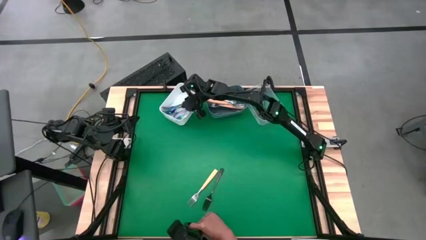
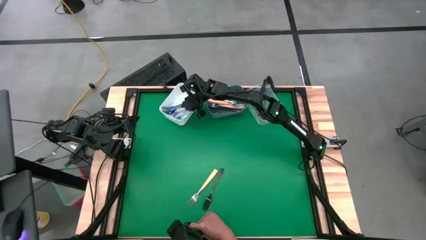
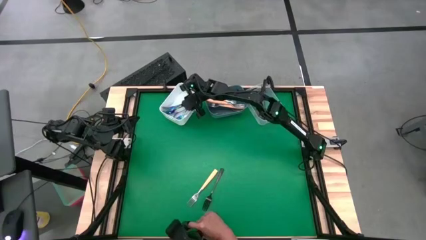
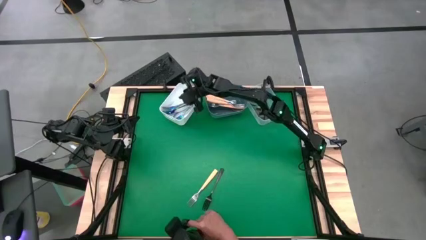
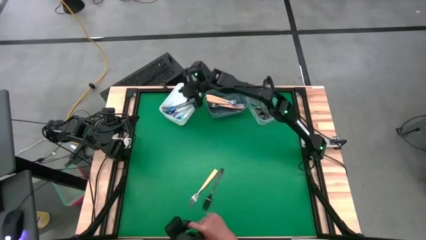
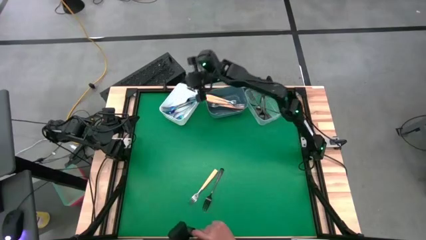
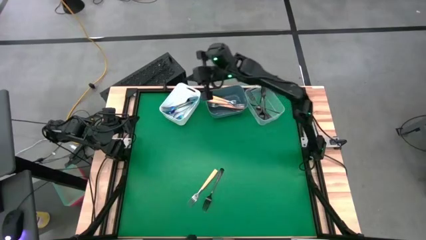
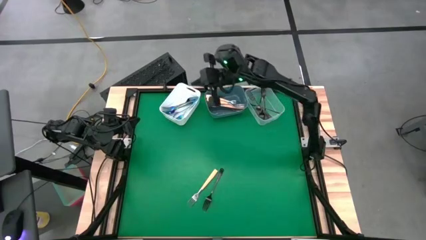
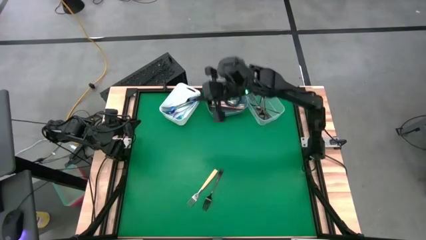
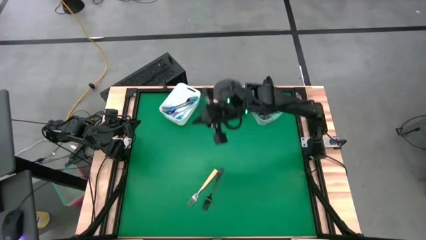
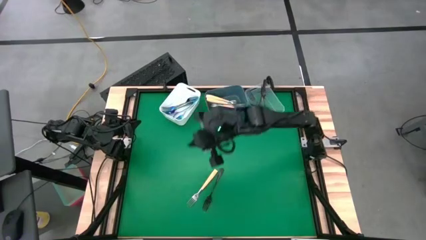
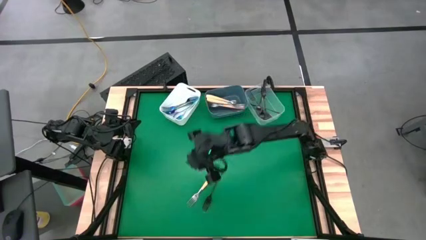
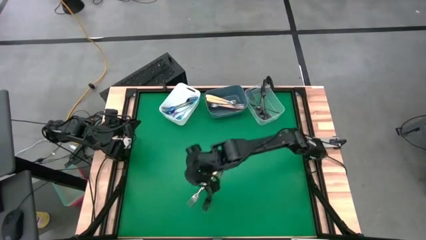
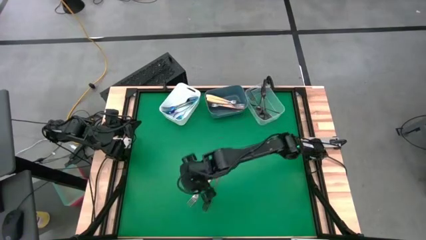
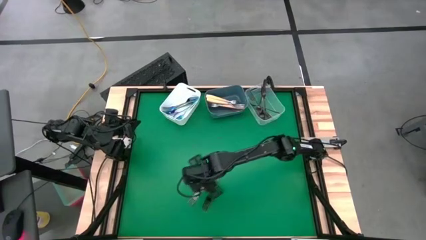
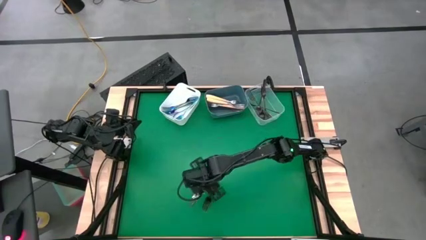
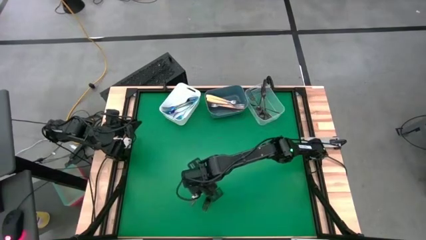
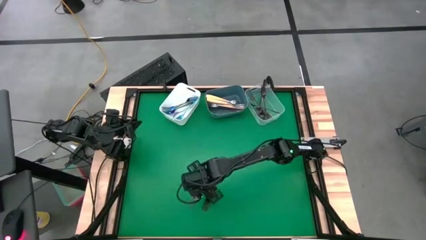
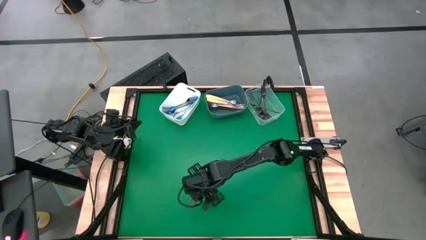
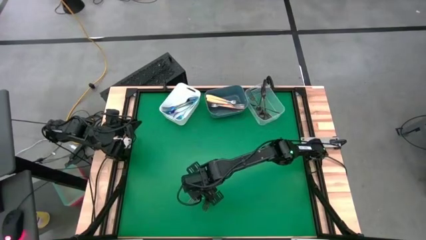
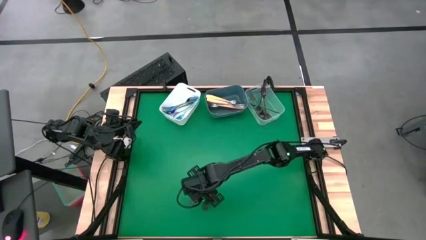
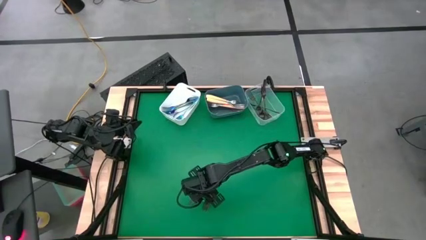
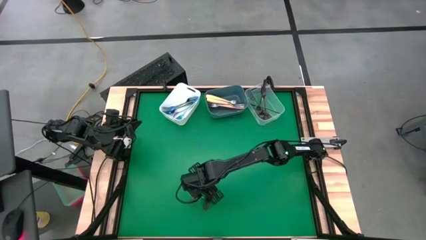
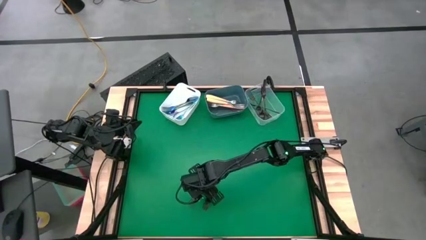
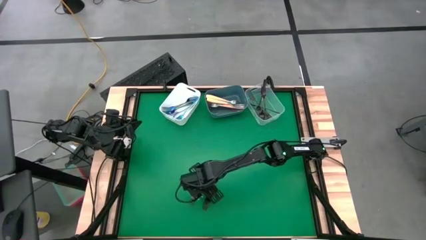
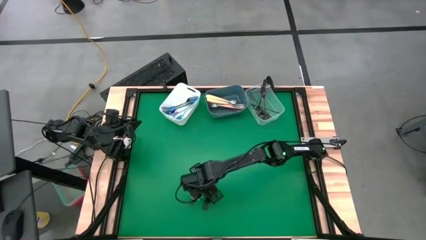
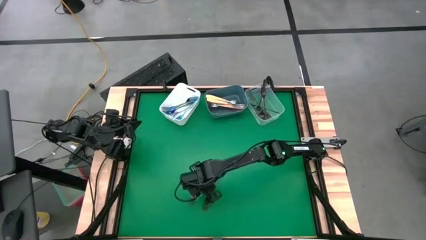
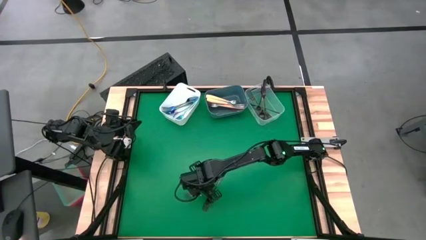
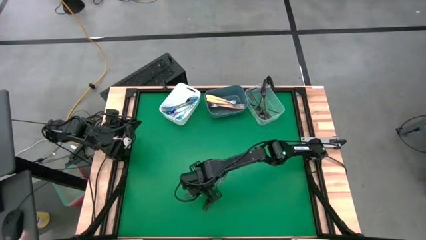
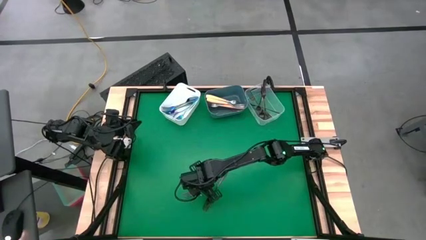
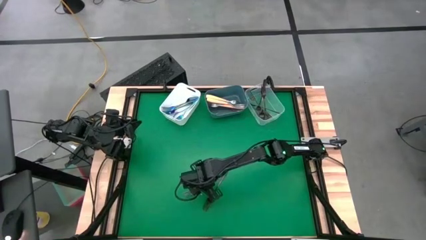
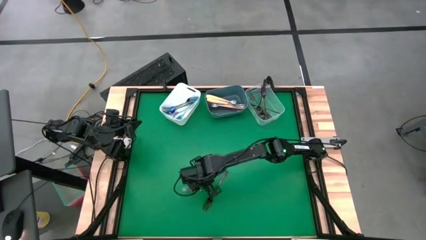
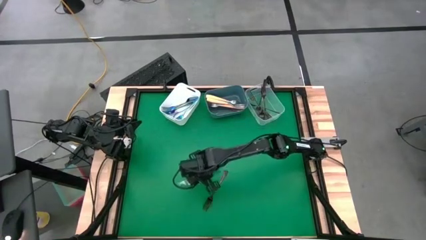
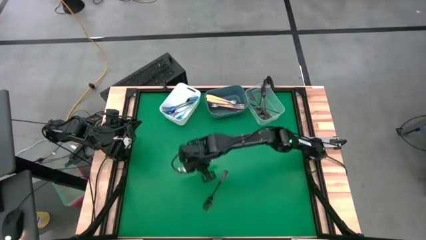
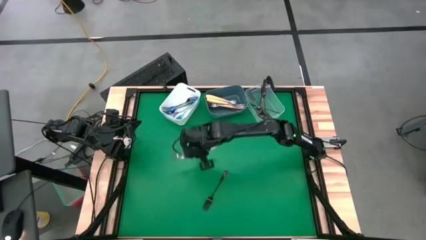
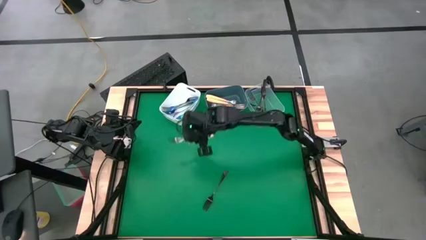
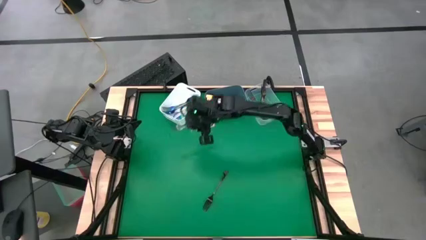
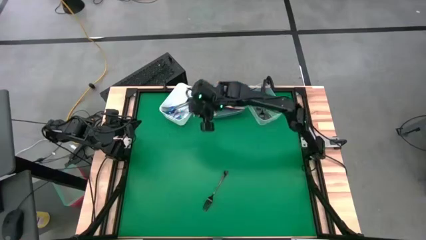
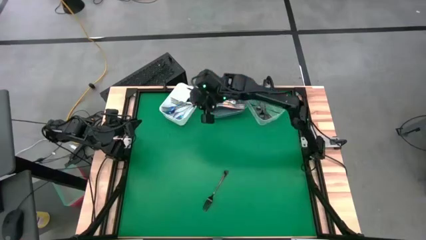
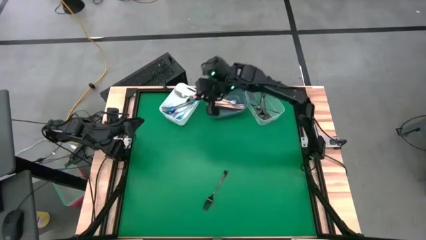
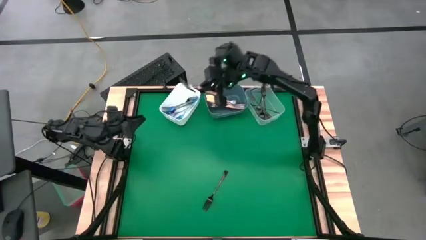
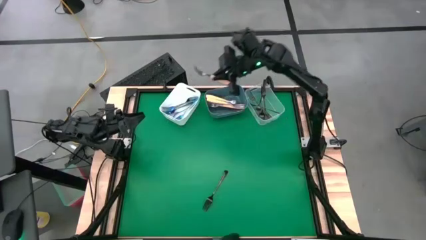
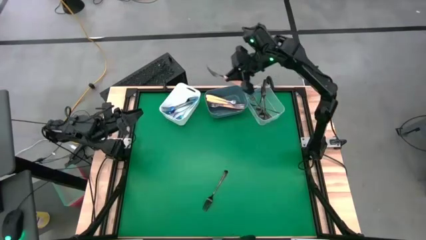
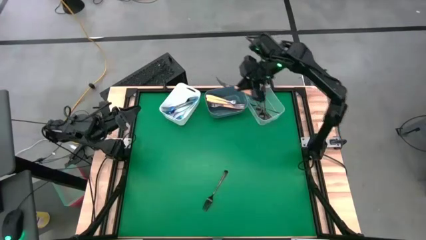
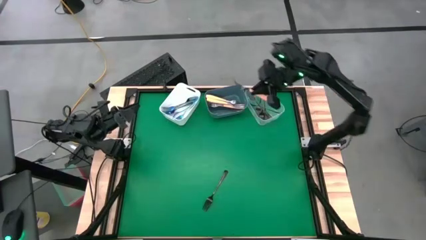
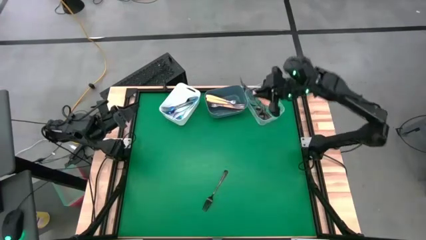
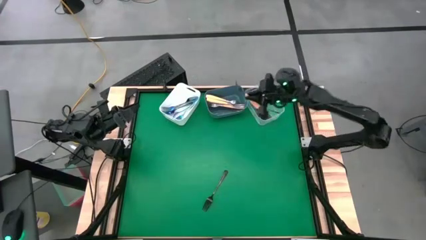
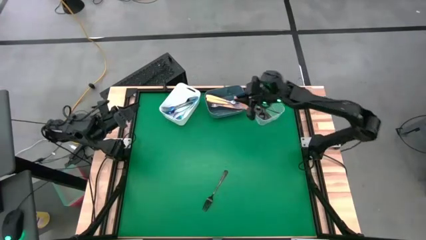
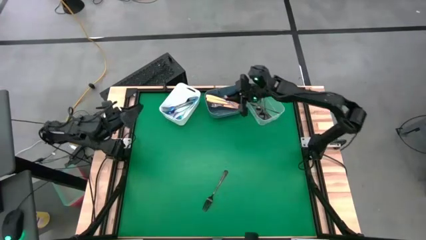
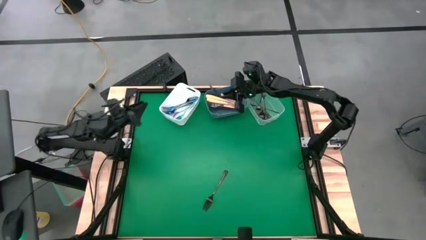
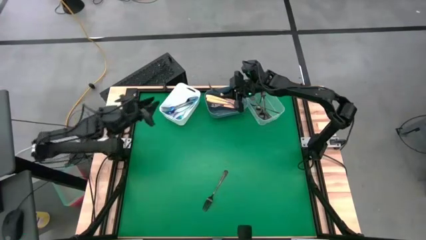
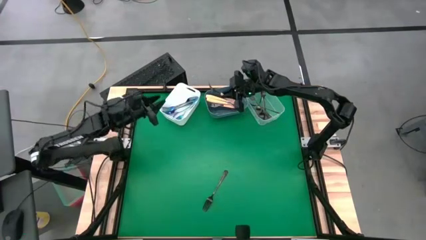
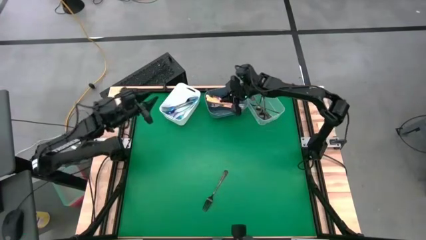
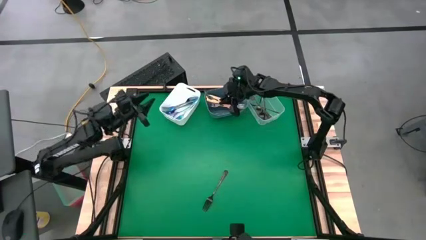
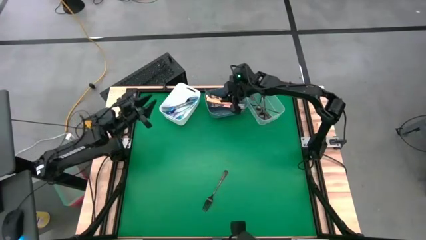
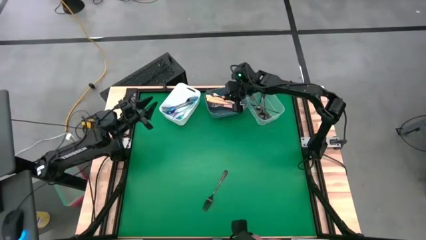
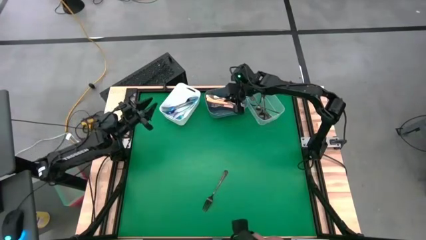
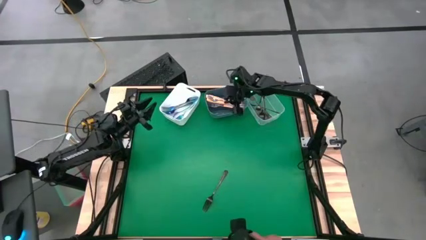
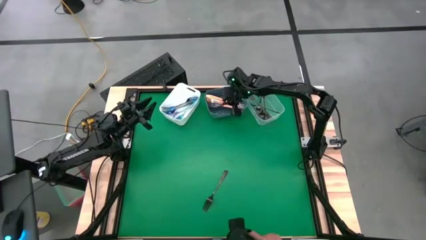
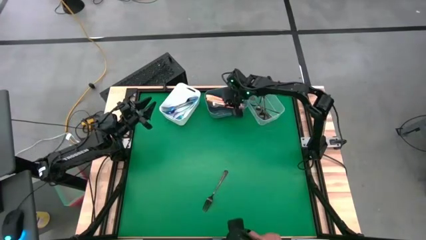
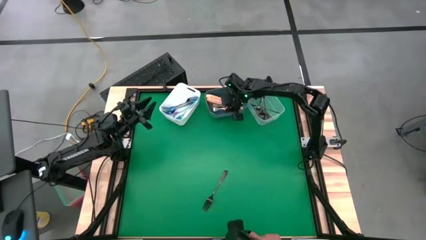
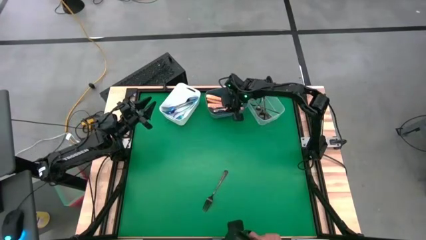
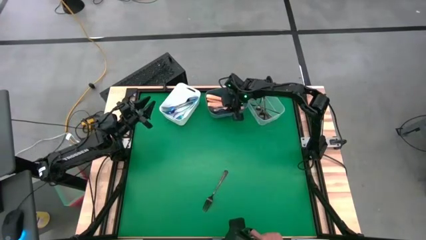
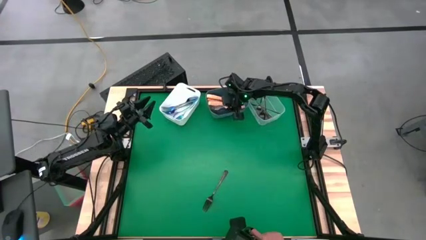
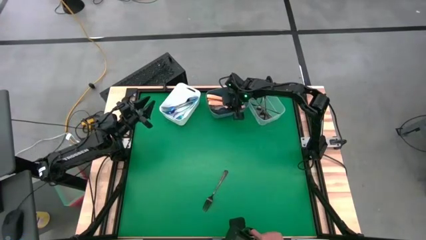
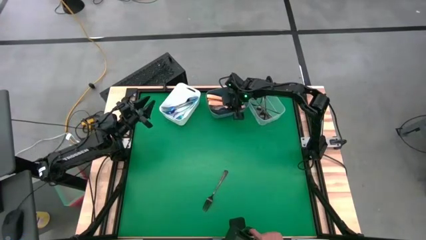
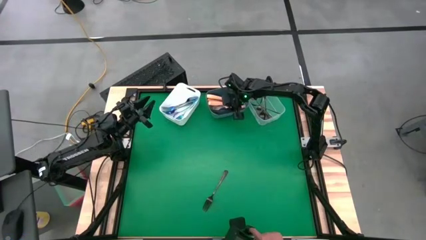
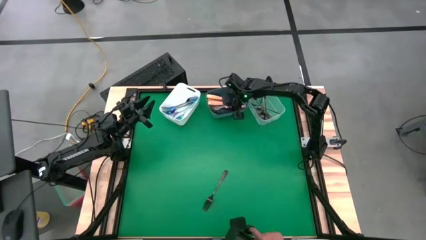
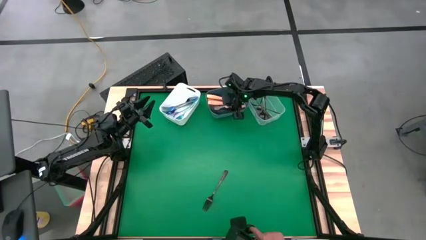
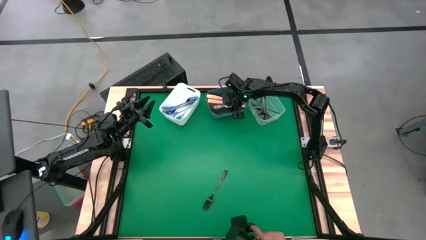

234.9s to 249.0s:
Task: Sort silverware by color (type)
Put the yellow fork into the blue bin

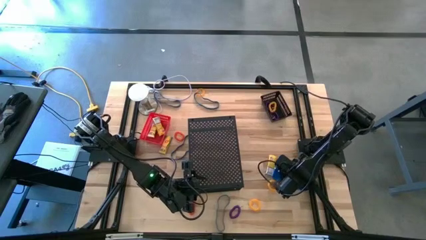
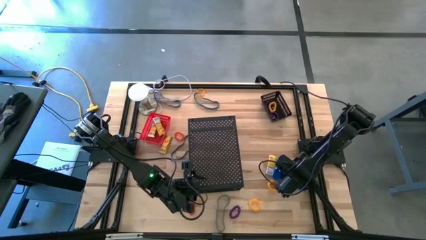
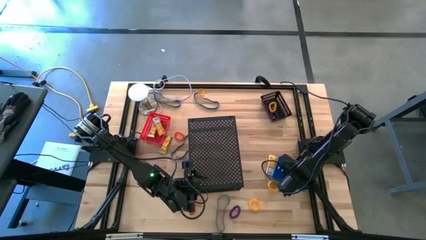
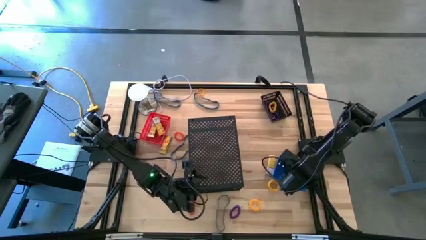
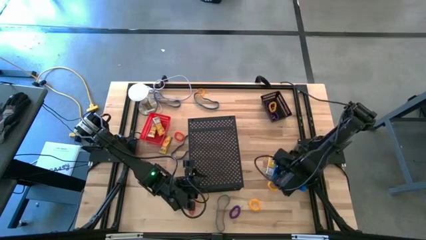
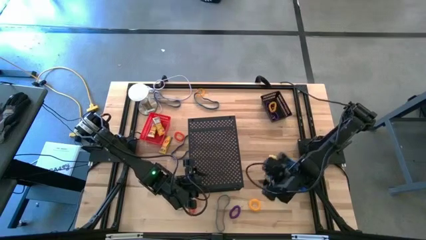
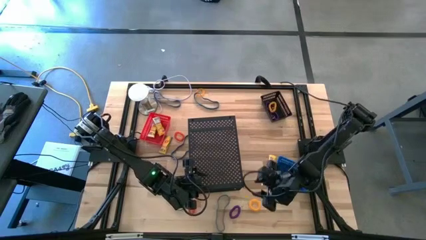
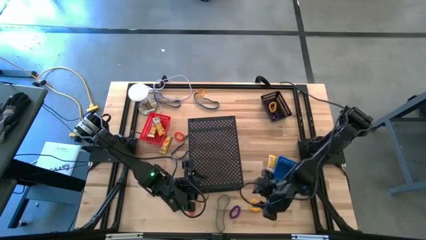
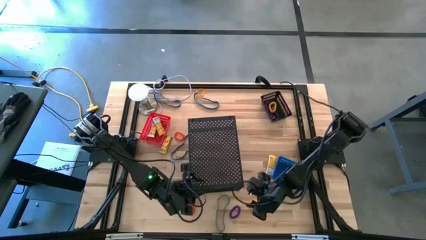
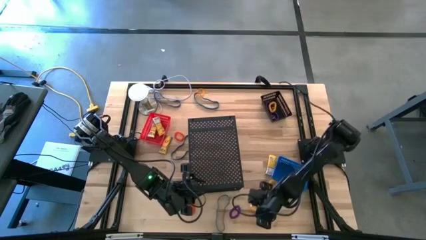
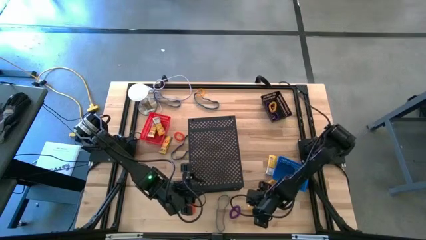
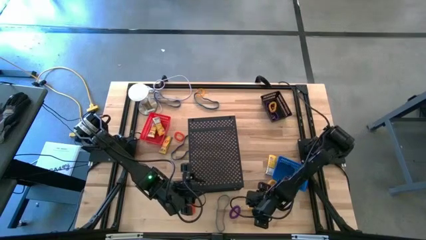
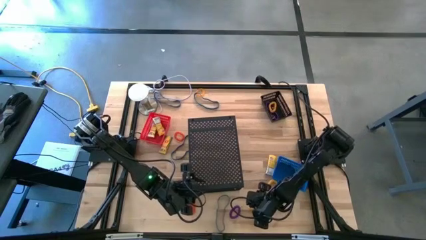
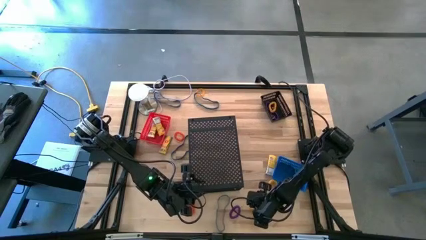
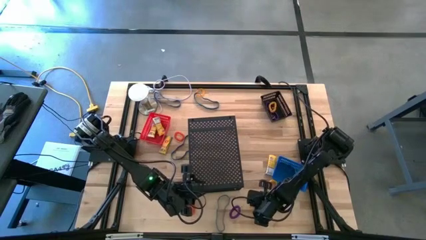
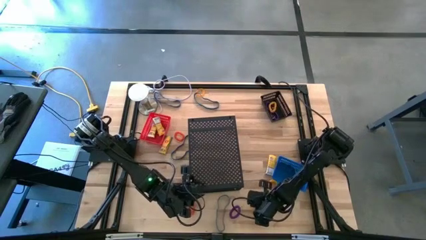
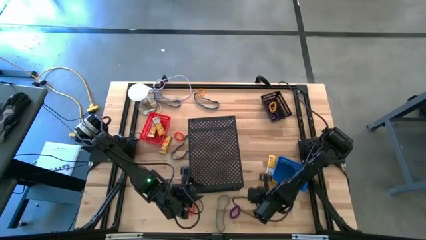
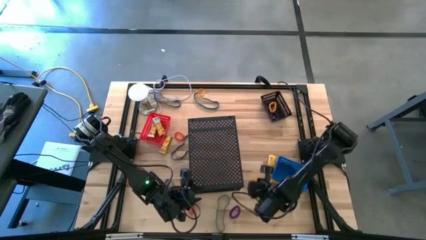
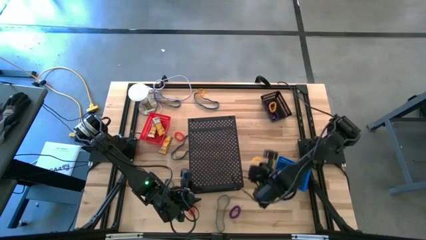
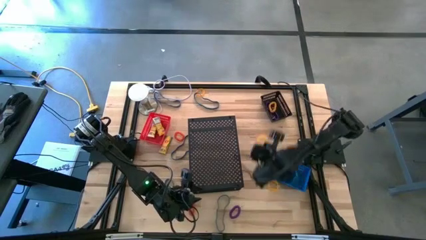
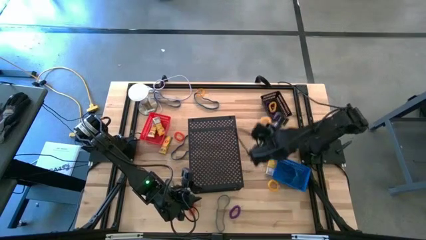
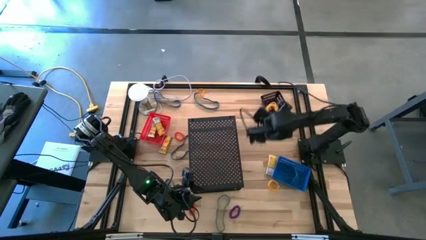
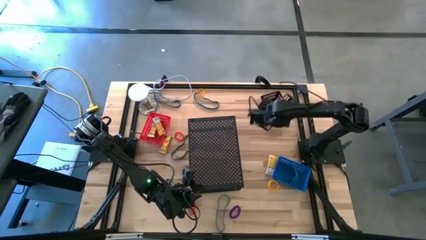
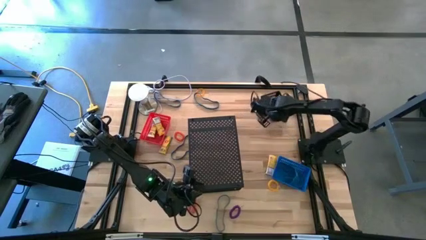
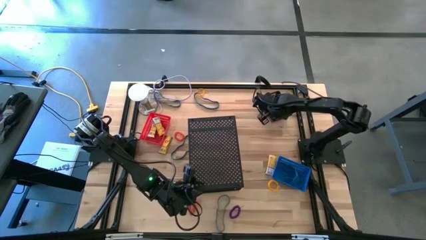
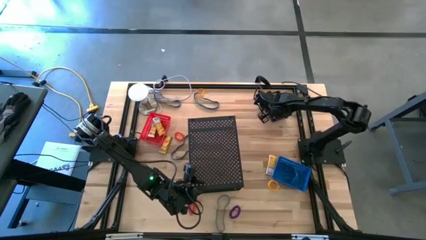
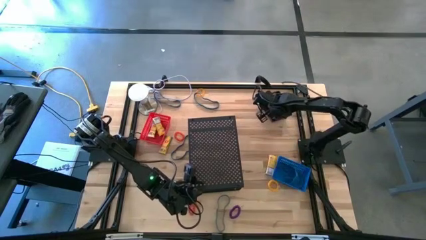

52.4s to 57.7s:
Task: Pick & Place Office Desk Supplies
Put the yellow spring keychain into the black bin
